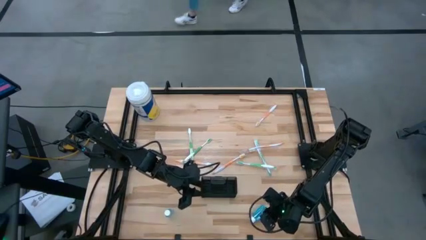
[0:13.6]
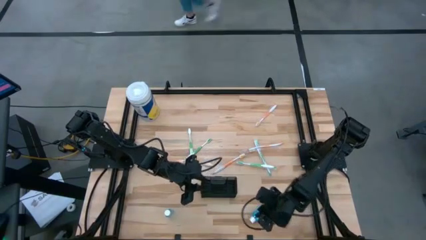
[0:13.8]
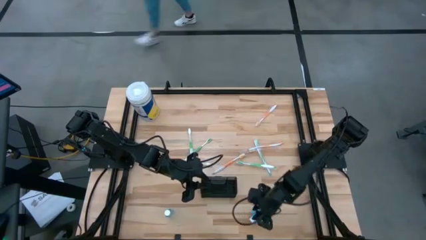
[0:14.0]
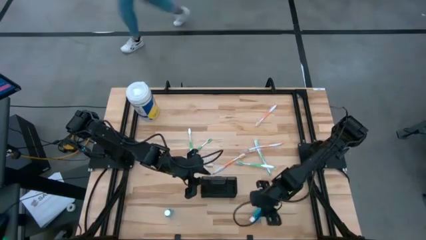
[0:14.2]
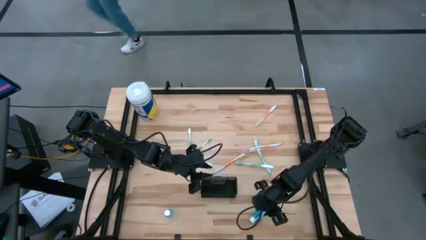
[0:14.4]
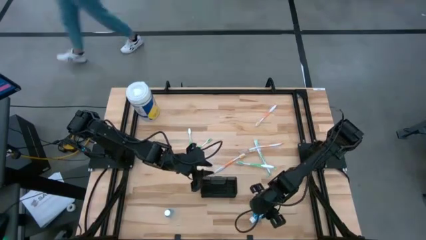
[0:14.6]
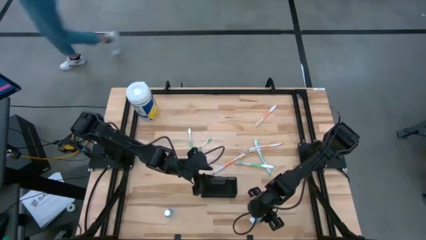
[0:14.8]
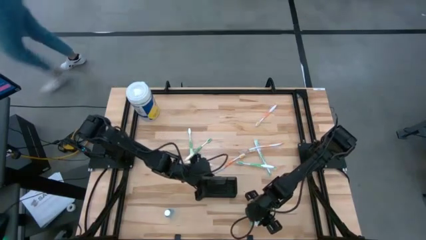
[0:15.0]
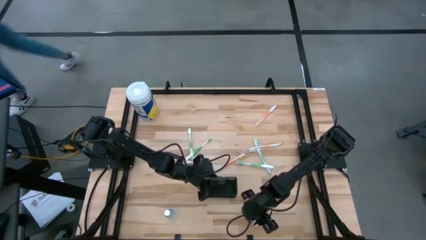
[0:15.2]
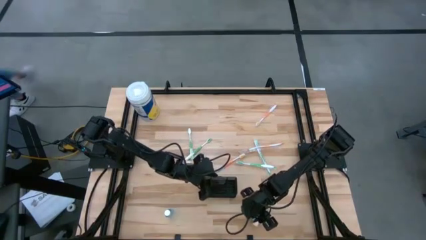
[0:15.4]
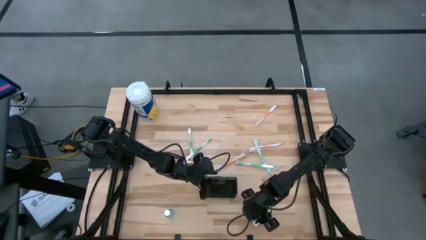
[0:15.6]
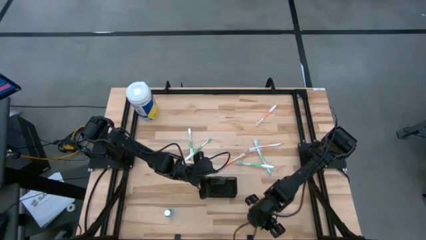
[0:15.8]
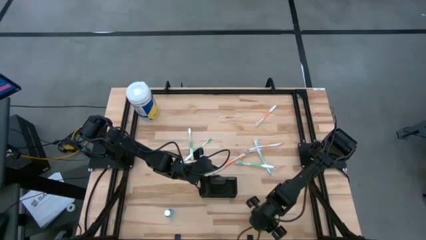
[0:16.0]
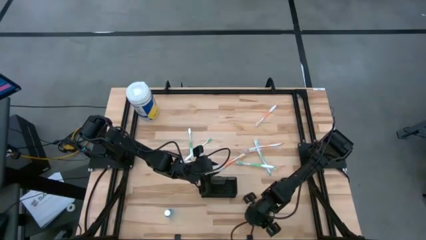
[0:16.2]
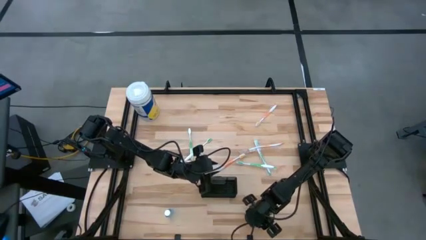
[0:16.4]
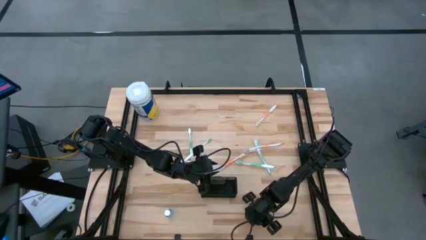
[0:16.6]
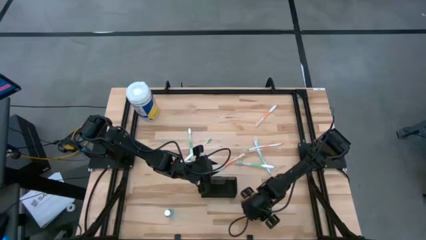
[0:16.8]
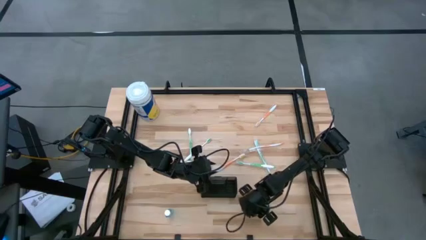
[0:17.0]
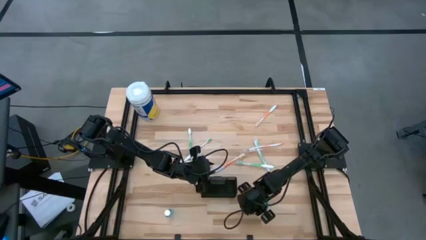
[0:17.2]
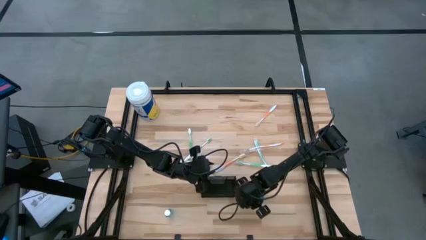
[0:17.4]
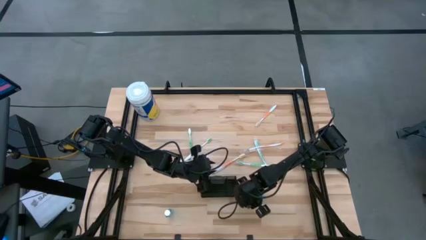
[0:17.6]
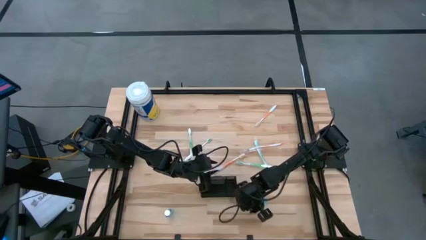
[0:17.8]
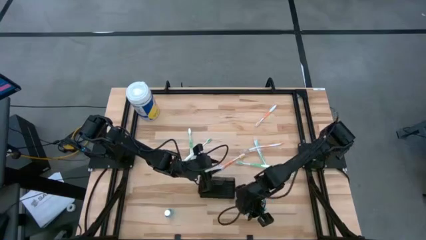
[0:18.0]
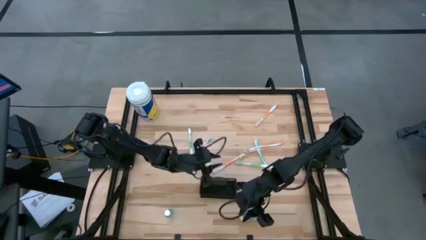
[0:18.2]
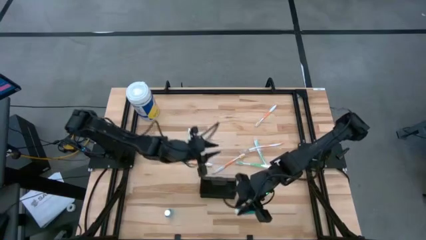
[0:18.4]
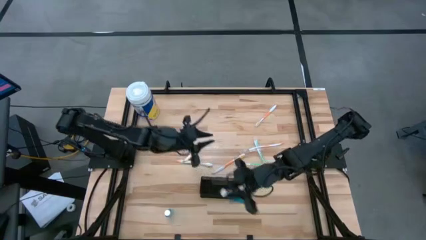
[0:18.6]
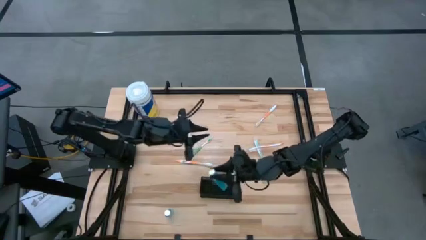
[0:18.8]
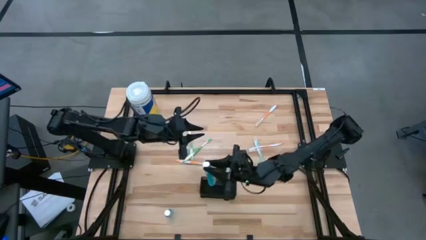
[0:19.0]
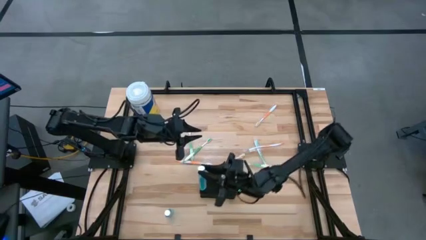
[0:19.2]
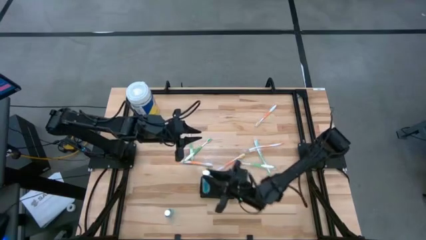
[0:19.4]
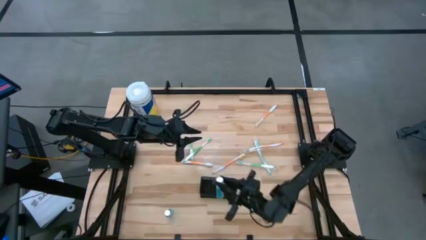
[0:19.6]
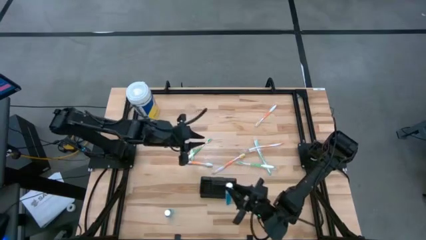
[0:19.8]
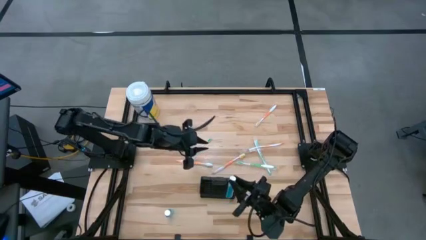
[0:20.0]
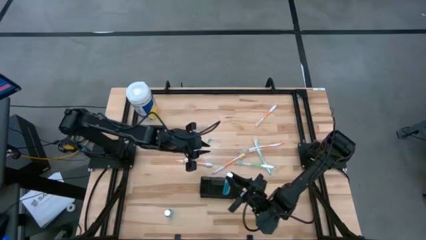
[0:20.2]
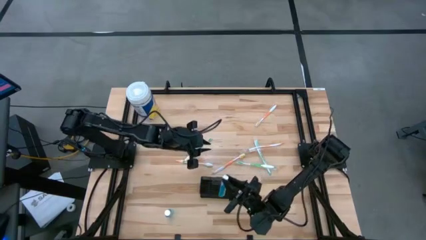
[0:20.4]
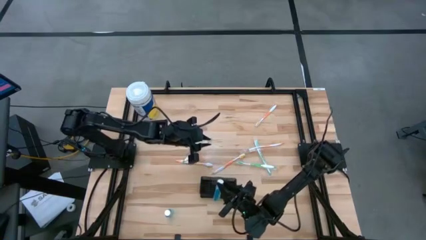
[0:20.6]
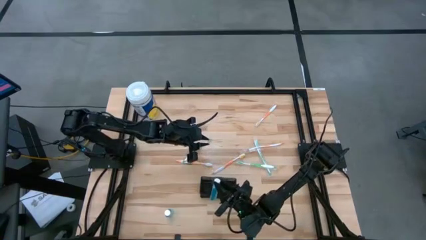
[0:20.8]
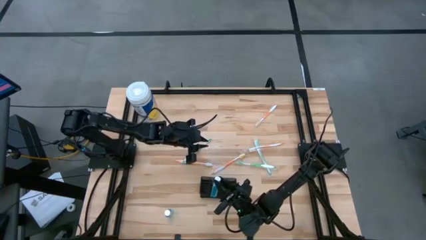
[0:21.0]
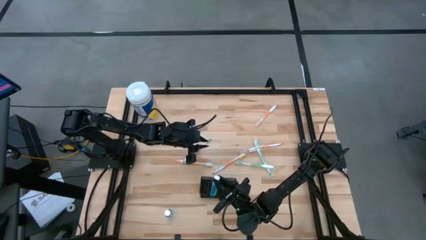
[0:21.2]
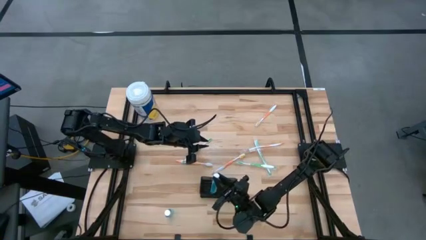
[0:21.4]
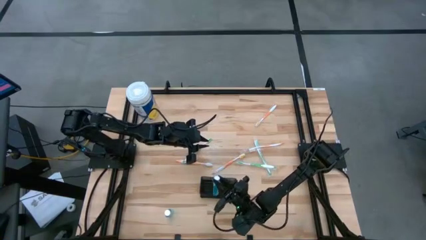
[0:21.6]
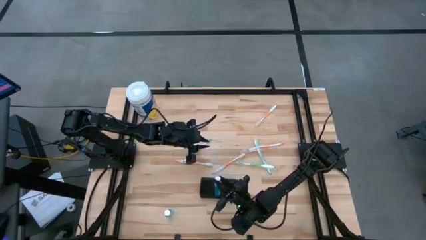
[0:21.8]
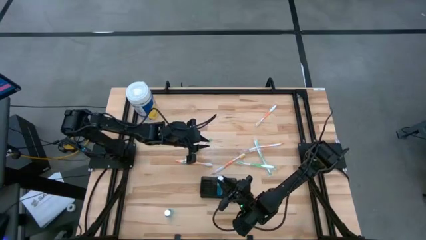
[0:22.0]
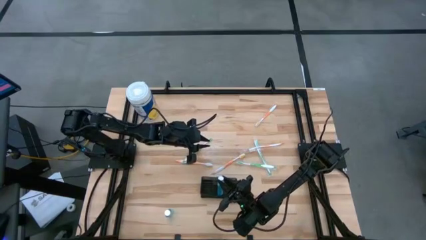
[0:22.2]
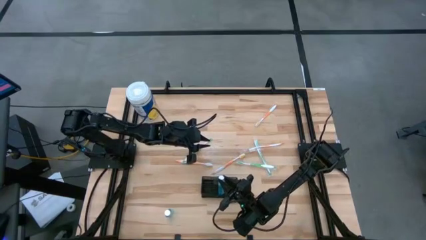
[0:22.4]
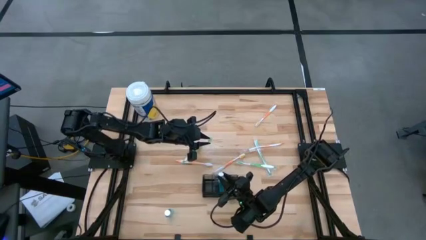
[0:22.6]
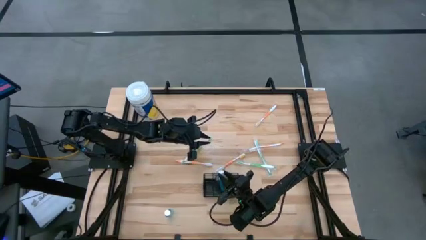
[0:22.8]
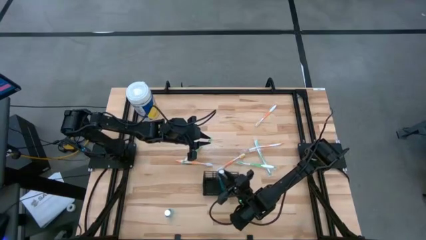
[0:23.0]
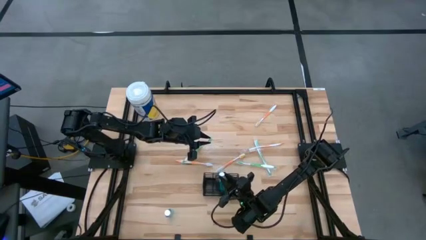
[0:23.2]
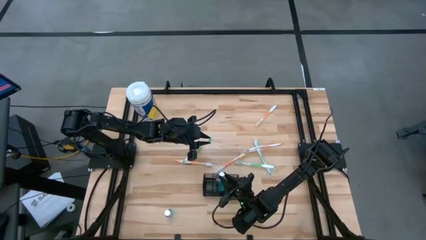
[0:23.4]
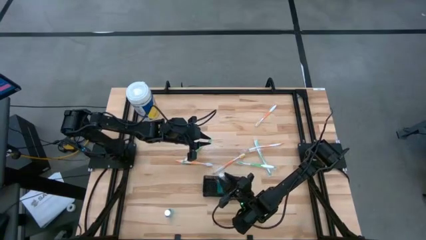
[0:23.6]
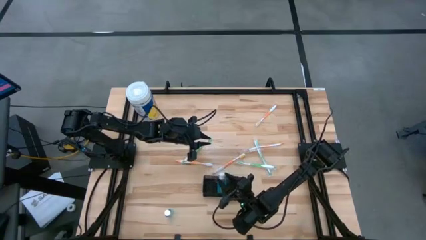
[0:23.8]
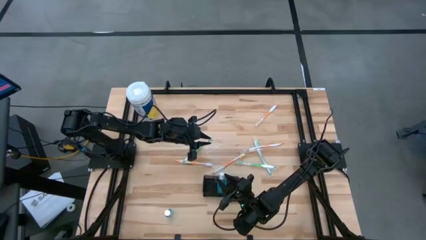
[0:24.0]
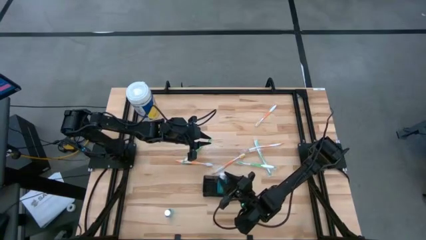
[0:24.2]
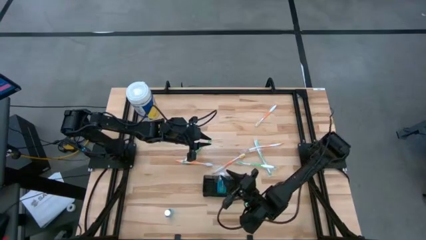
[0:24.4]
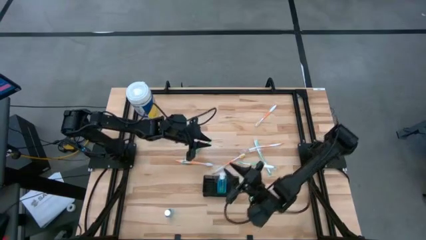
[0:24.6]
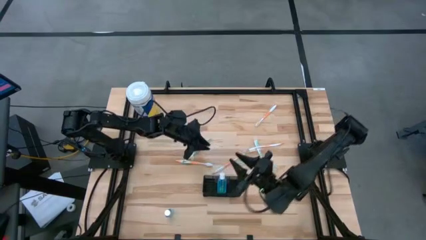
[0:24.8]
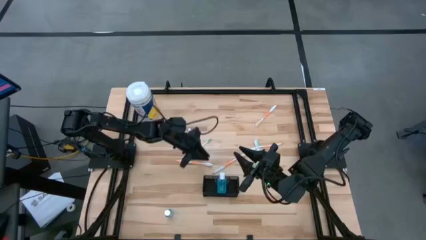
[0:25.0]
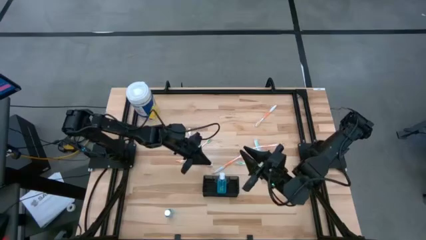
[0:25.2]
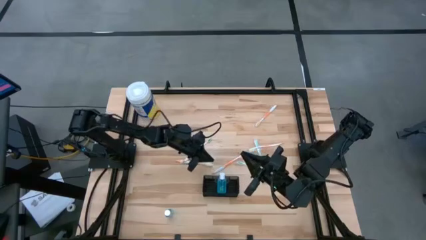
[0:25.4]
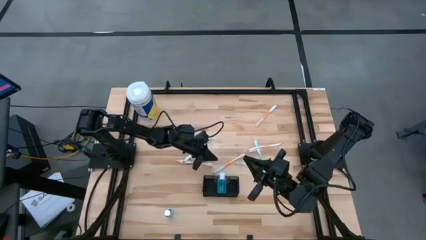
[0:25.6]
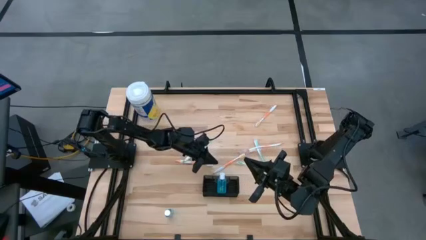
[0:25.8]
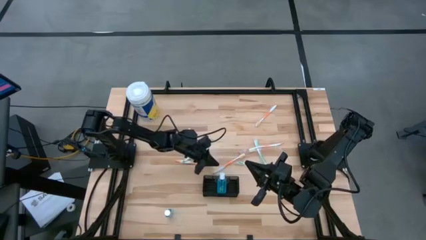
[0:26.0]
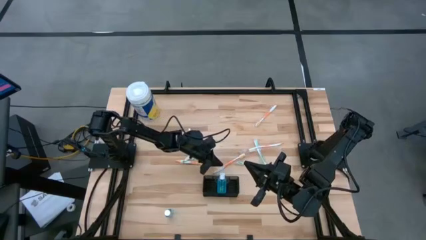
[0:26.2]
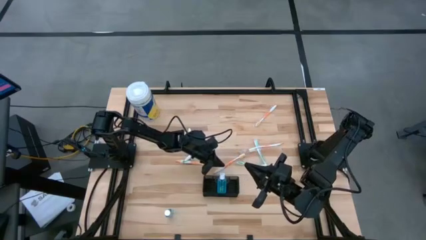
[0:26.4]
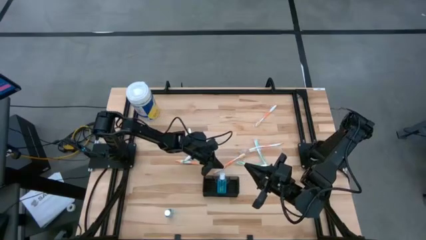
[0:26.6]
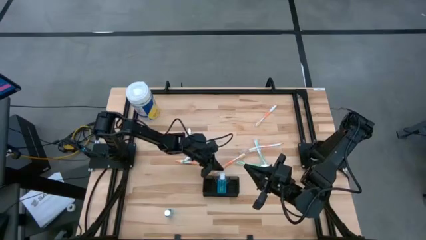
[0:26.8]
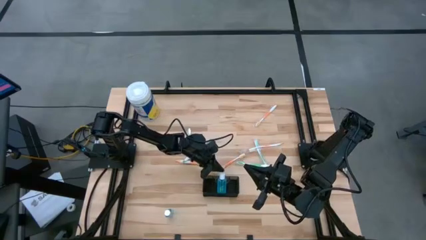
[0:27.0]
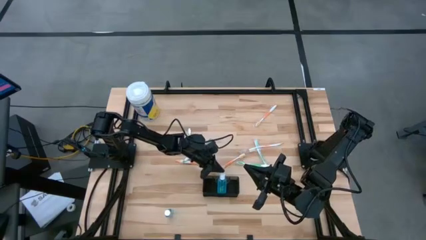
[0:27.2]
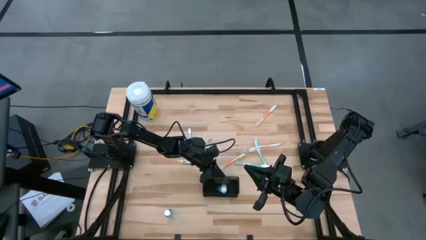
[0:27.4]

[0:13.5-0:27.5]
Task: Pick & Place toothbrushing station
Put the blue mouthwash into the black wire organizer
